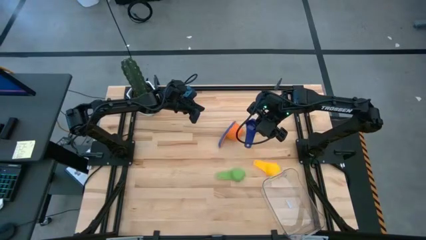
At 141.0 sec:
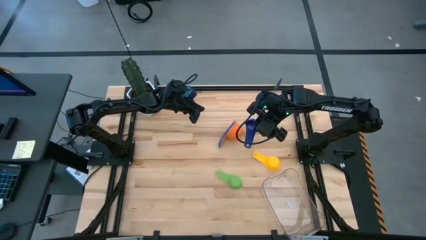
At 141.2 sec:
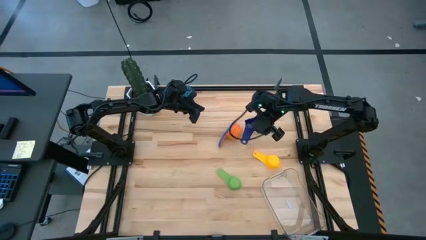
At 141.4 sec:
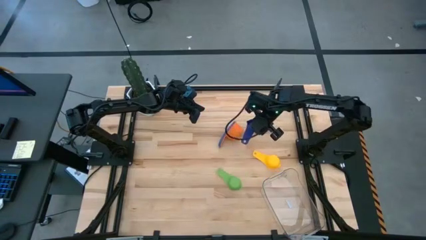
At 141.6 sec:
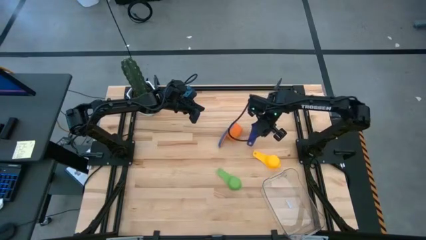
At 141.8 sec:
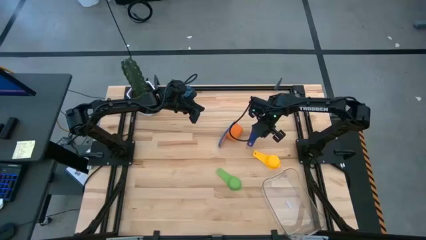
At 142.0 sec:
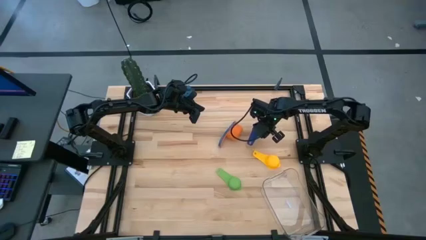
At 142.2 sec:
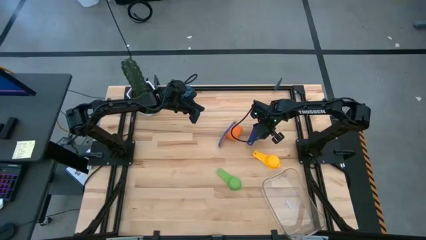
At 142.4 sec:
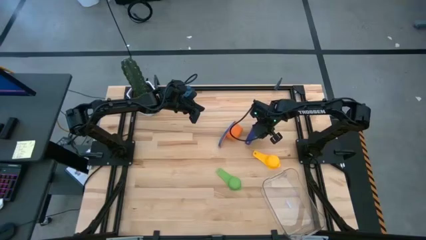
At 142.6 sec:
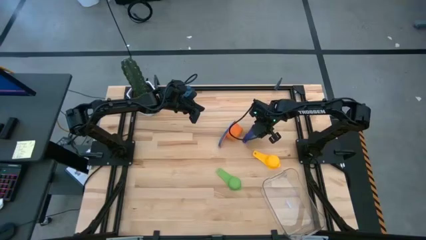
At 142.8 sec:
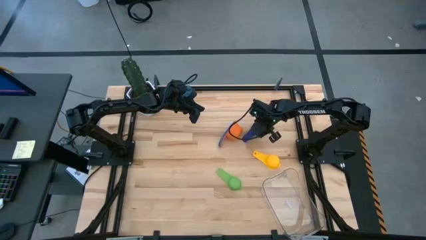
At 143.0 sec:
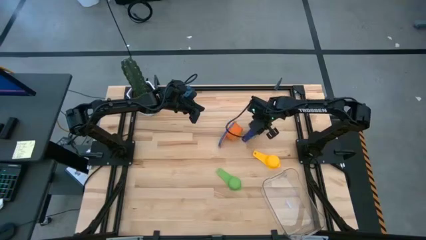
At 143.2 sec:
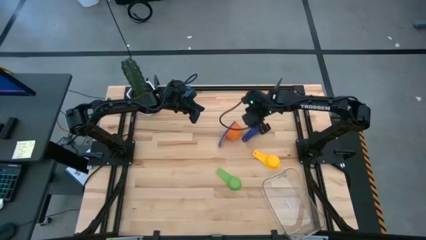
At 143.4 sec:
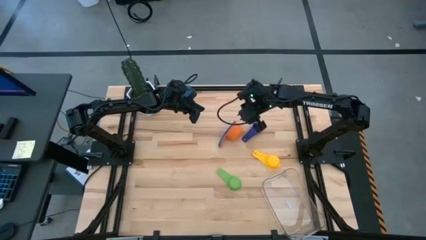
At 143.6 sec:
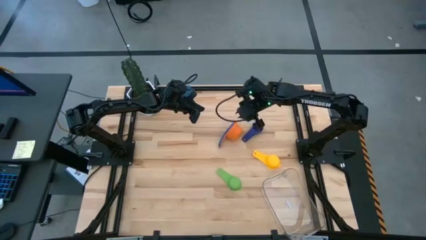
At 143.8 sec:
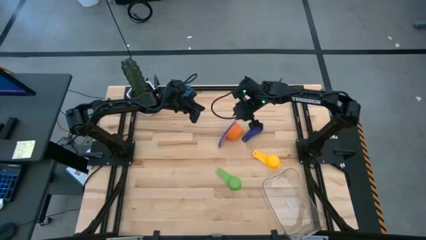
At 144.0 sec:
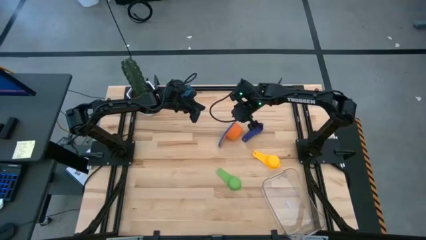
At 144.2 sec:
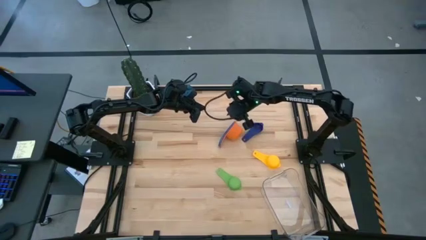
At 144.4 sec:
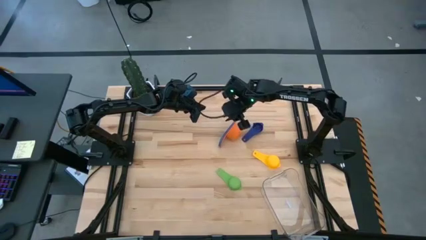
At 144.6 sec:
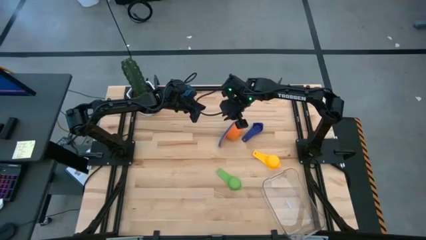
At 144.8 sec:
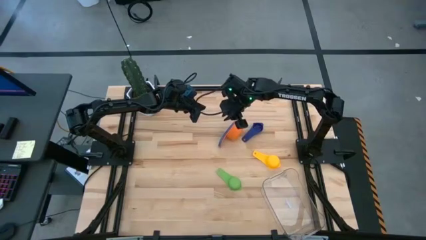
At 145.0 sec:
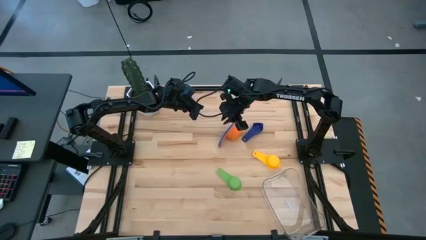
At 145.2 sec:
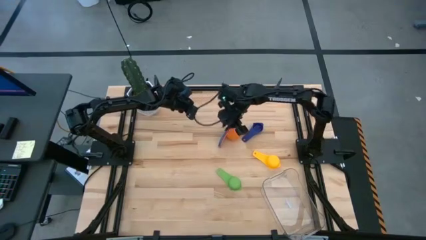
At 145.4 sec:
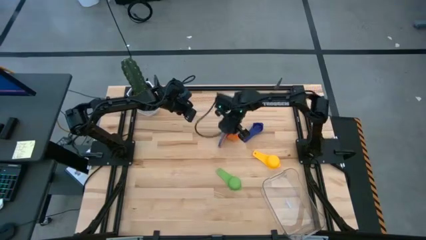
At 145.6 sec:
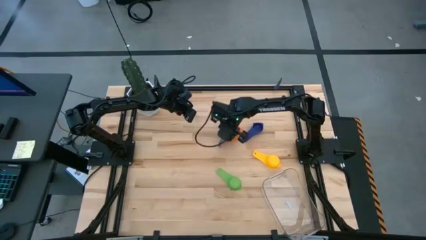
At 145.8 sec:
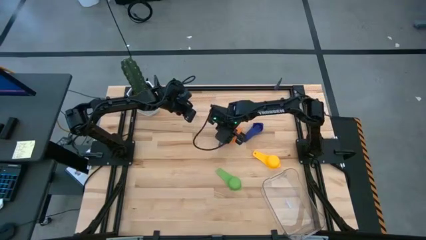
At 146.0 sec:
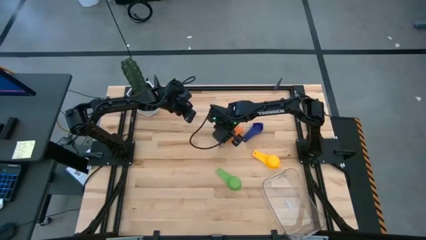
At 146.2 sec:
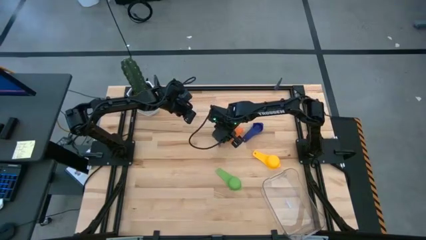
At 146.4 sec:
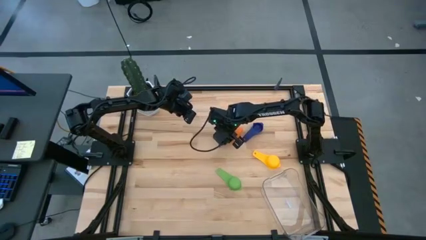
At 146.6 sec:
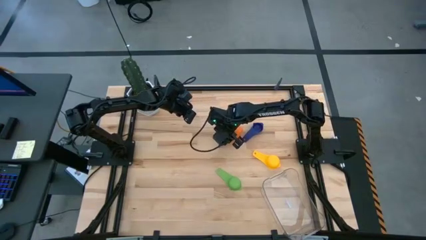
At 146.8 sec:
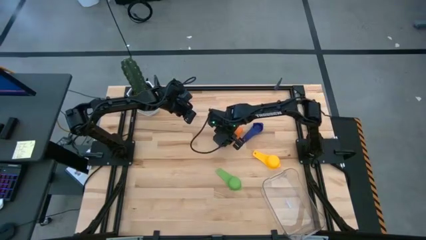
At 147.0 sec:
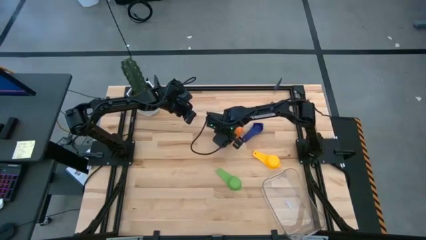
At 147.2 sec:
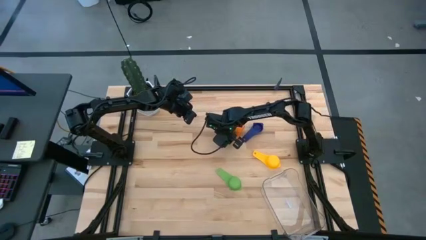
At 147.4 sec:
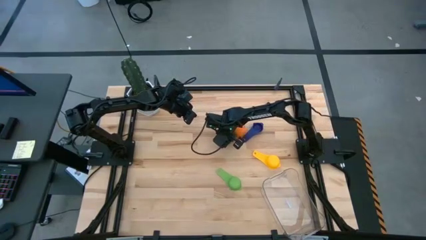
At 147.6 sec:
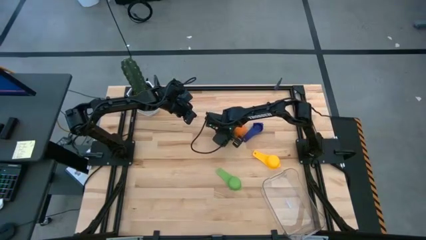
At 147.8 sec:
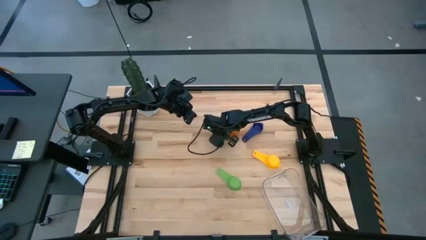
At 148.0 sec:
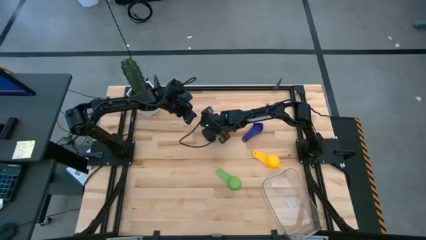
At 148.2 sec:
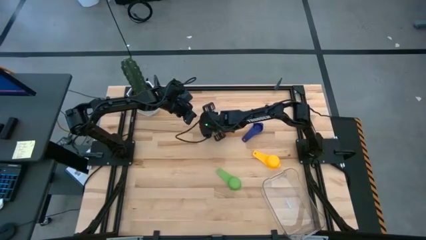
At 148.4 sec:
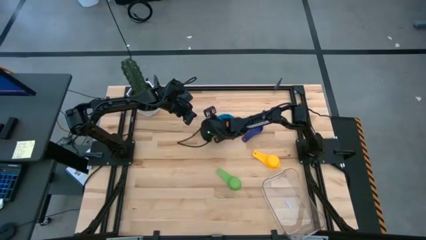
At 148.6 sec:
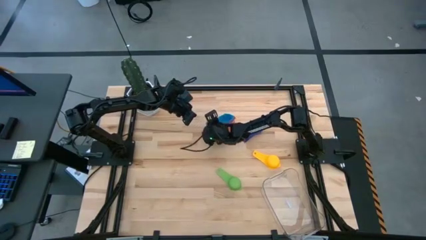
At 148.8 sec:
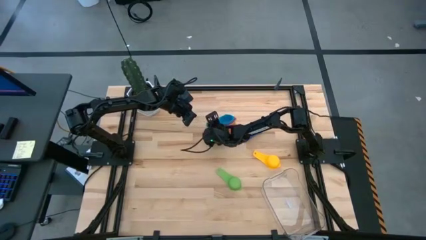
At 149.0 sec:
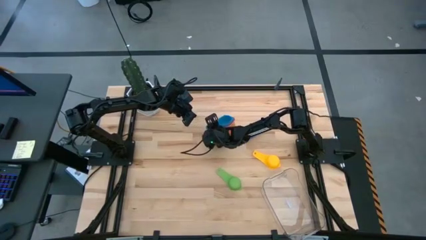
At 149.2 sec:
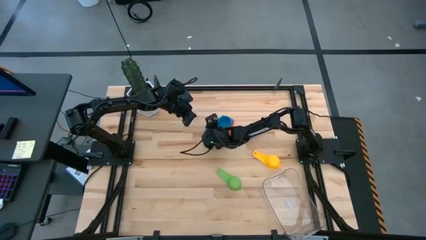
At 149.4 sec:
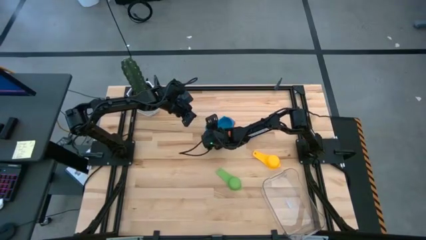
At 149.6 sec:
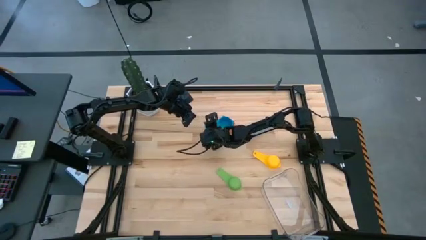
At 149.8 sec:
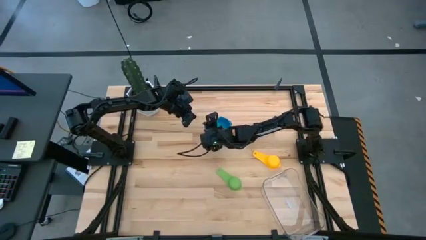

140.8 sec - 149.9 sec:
Task: Nest measuring cups in basket
Adjust the stacked measuring cups

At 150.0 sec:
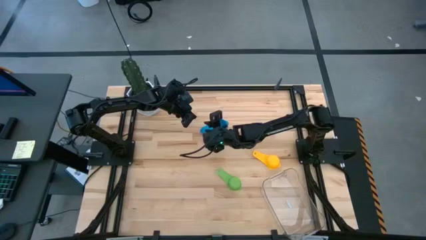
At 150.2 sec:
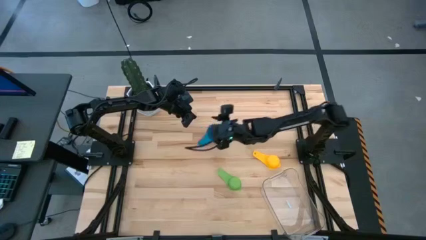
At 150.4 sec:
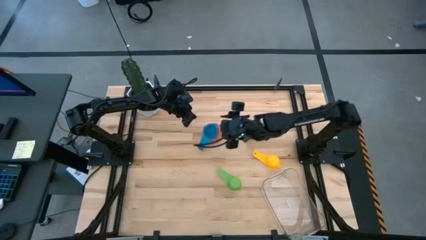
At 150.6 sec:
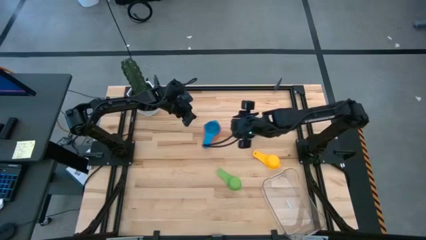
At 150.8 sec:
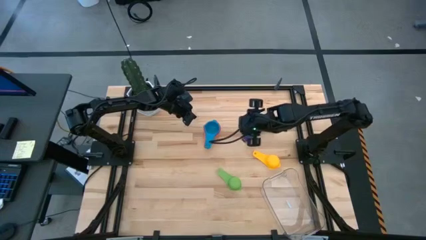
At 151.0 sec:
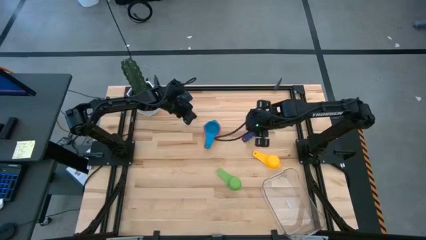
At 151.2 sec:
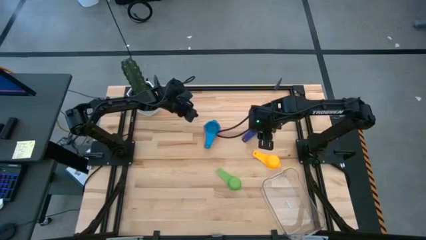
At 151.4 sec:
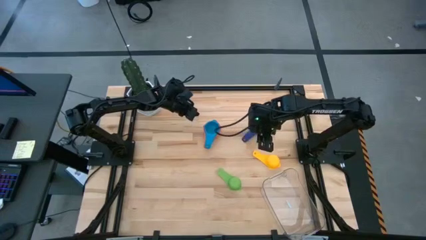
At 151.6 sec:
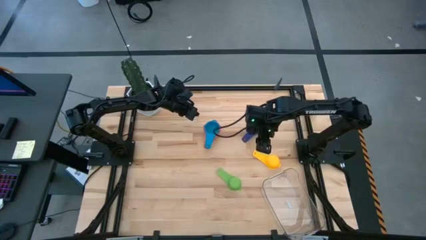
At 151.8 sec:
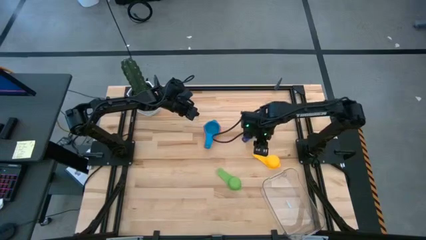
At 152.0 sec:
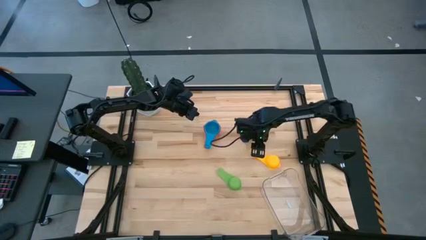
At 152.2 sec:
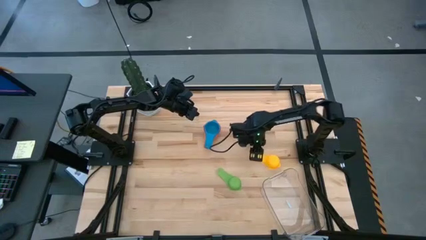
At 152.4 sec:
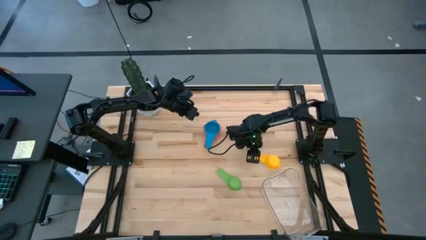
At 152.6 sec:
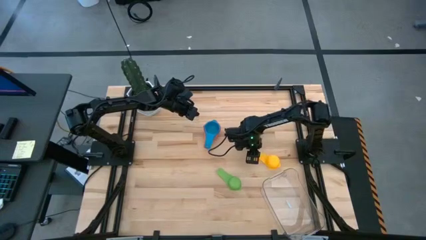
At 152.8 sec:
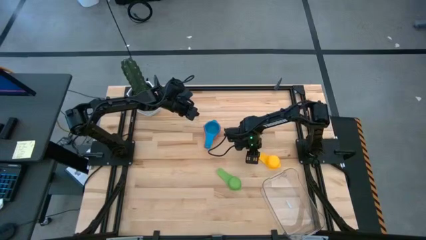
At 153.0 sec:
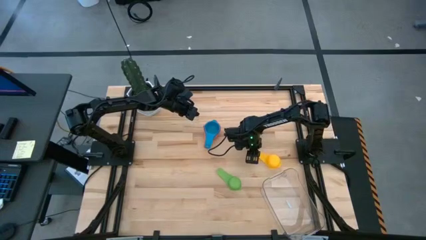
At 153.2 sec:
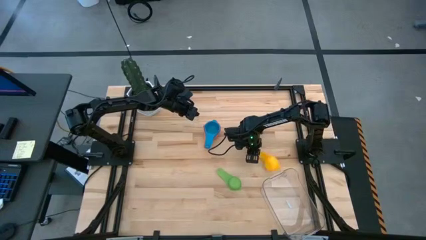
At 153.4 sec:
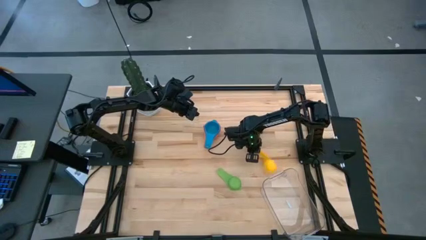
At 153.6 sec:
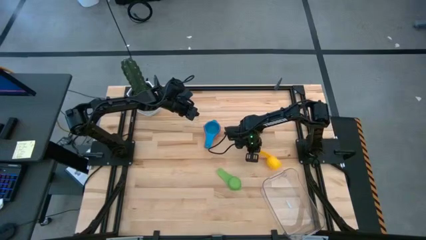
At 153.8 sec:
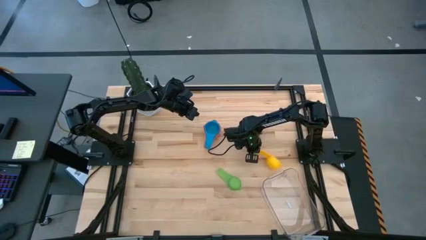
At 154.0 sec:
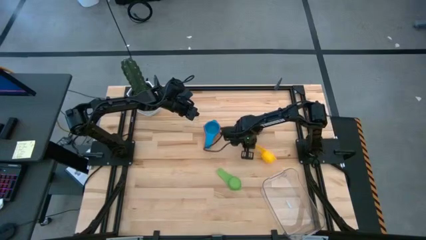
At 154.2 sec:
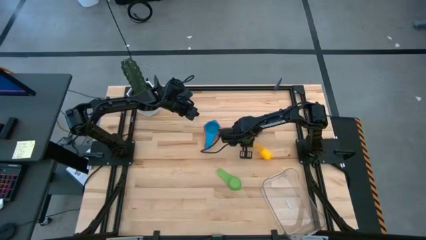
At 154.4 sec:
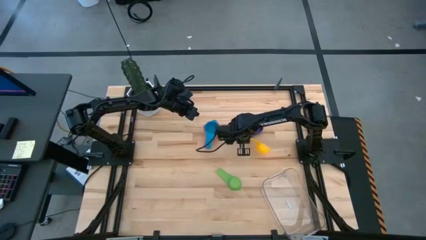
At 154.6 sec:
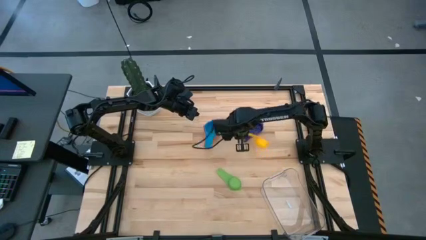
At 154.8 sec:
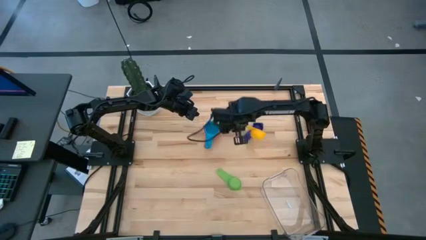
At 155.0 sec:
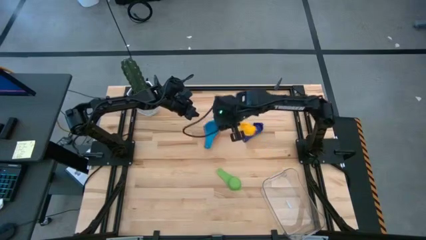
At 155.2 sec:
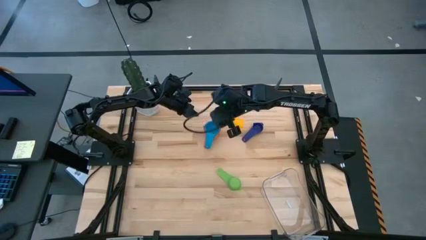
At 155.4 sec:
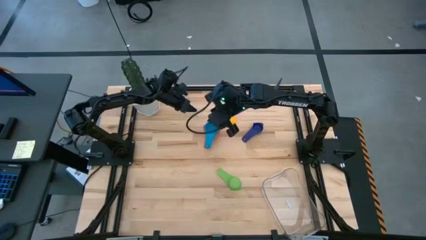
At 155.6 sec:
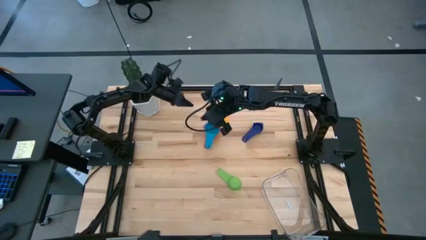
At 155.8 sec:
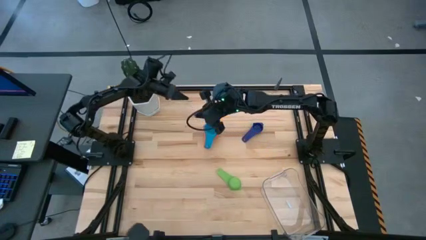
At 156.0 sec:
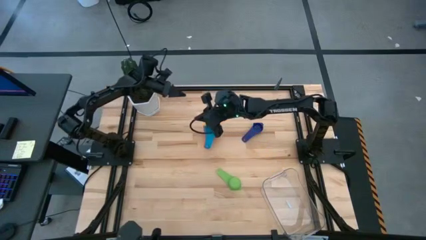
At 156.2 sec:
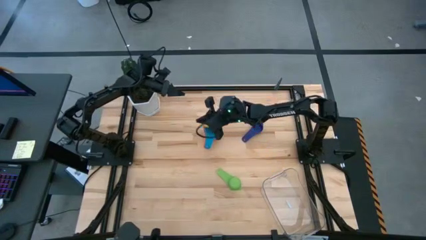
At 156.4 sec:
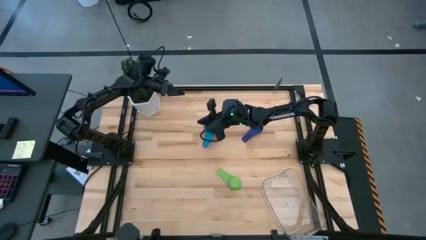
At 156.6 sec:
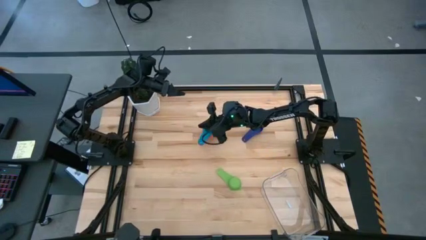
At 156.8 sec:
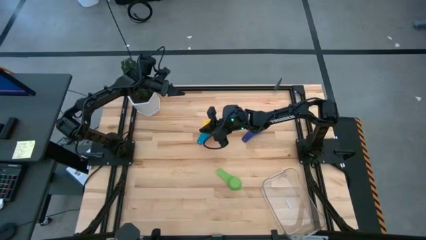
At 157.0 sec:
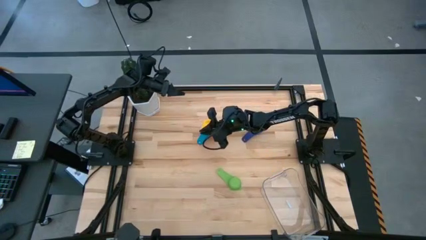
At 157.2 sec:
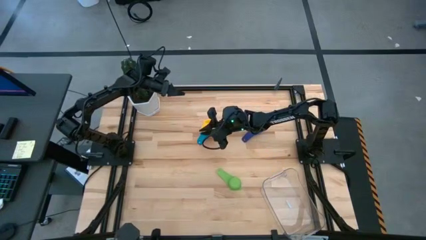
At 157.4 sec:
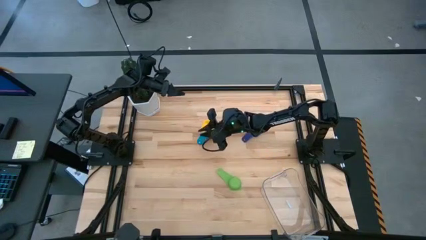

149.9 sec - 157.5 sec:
Stack the yellow measuring cup on top of the blue measuring cup
